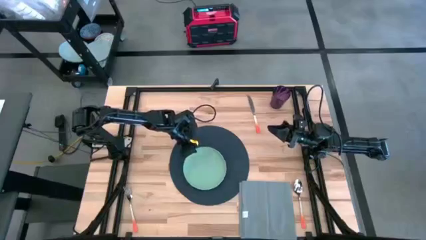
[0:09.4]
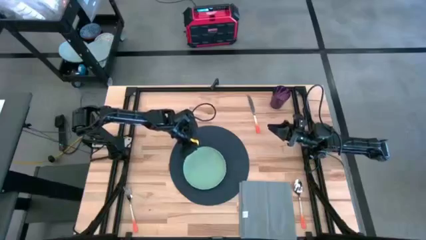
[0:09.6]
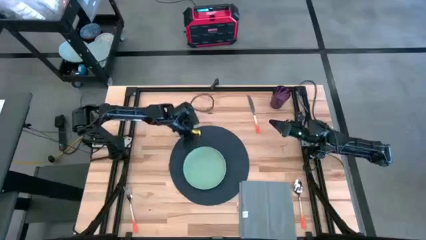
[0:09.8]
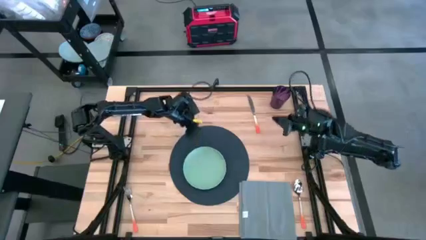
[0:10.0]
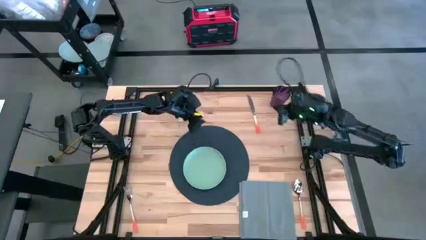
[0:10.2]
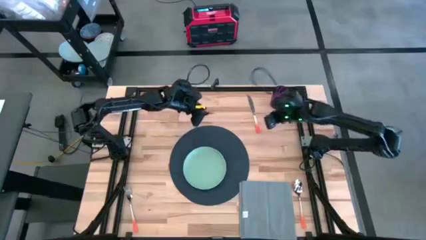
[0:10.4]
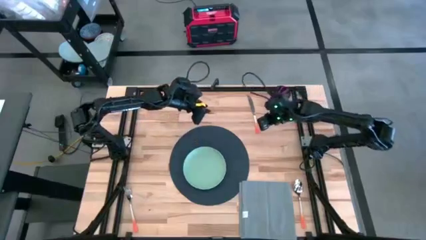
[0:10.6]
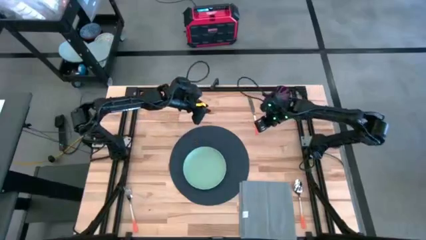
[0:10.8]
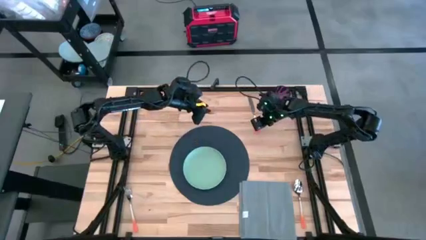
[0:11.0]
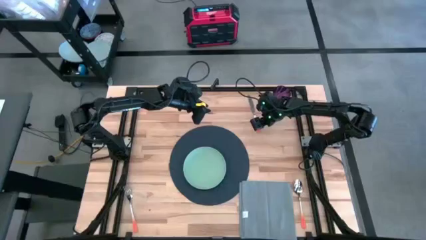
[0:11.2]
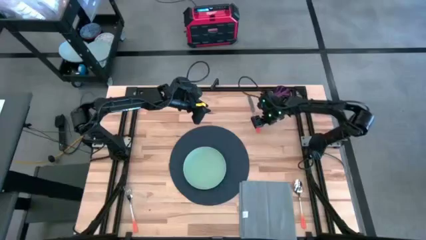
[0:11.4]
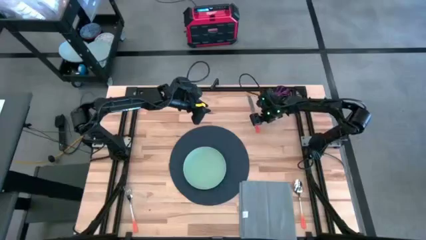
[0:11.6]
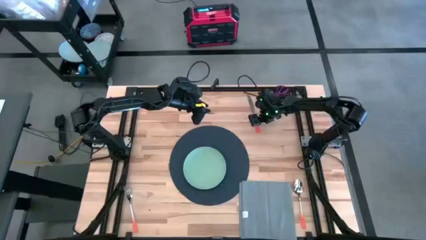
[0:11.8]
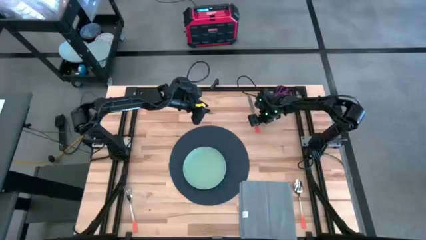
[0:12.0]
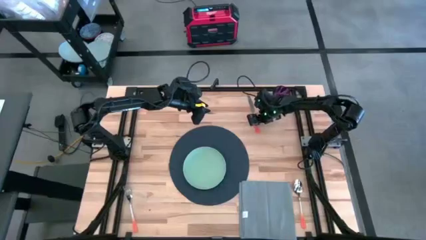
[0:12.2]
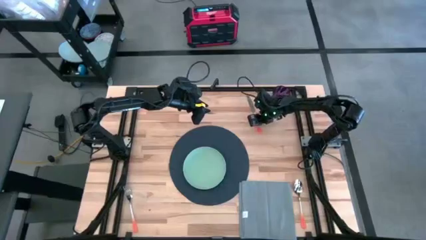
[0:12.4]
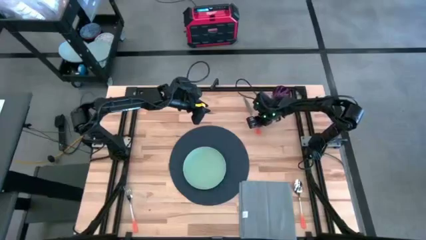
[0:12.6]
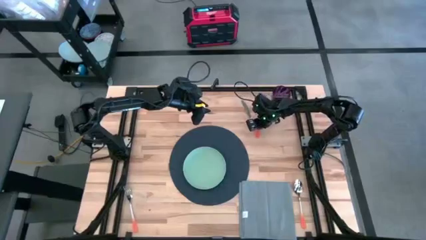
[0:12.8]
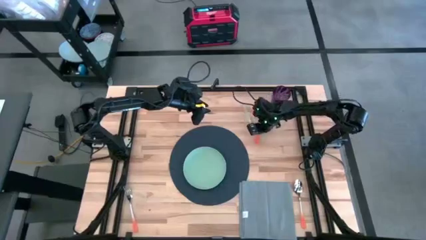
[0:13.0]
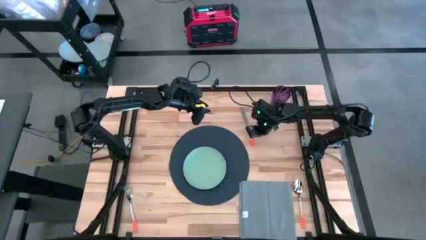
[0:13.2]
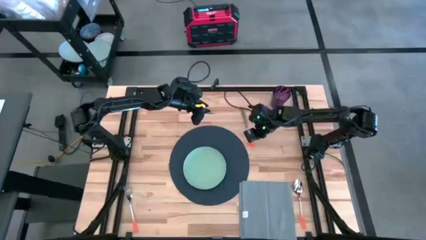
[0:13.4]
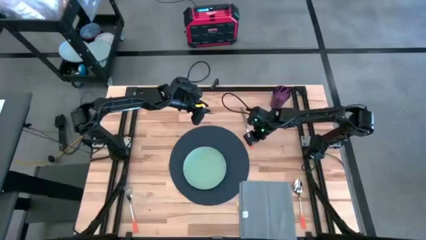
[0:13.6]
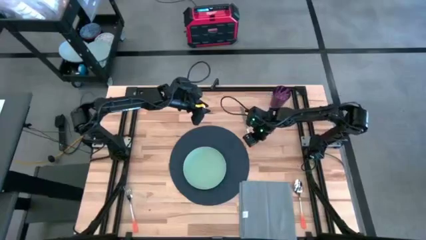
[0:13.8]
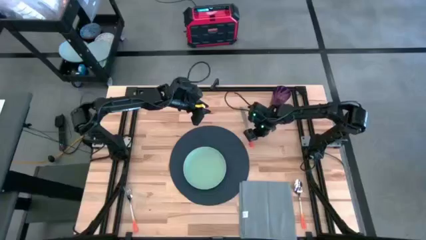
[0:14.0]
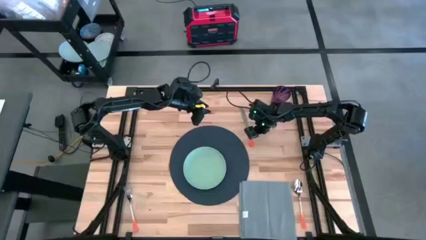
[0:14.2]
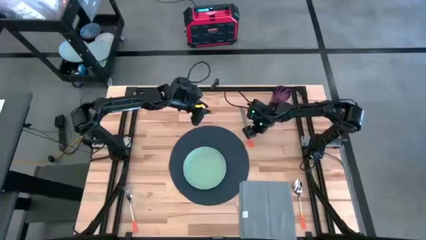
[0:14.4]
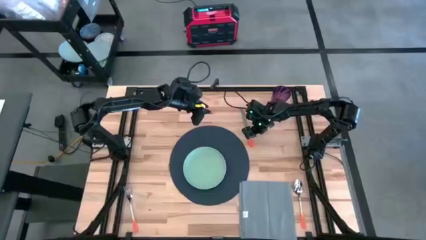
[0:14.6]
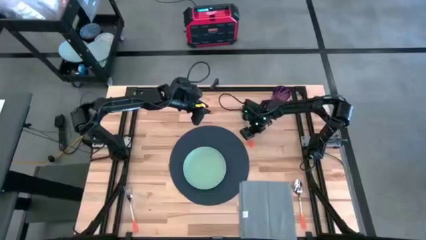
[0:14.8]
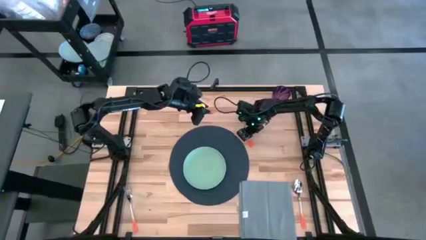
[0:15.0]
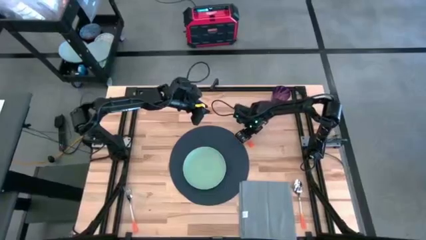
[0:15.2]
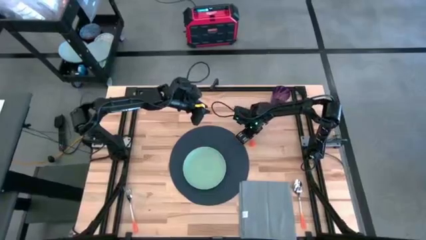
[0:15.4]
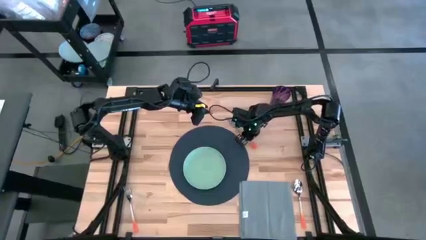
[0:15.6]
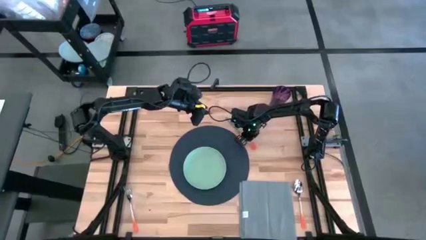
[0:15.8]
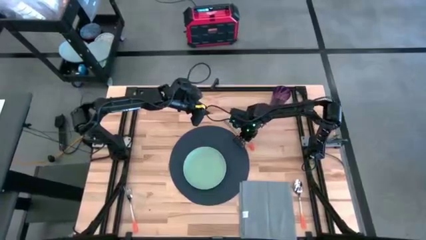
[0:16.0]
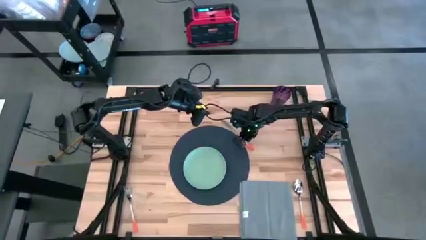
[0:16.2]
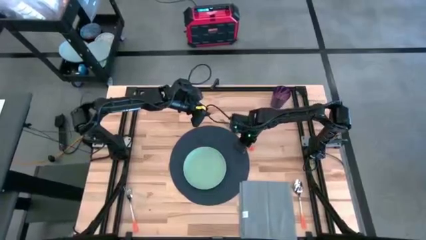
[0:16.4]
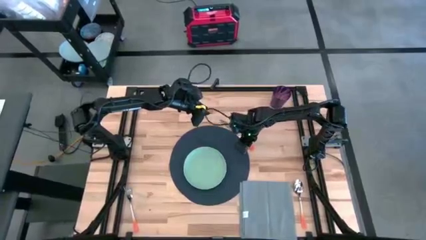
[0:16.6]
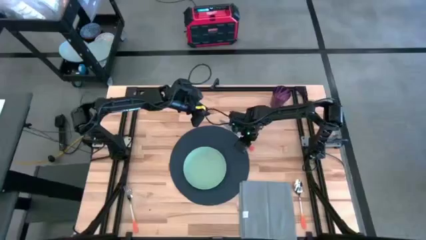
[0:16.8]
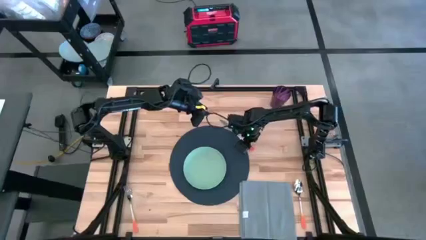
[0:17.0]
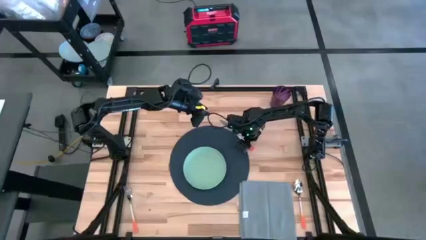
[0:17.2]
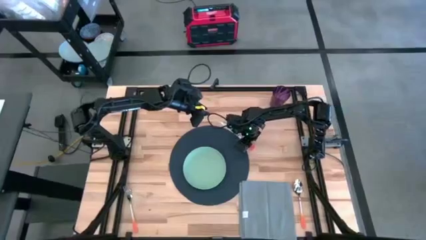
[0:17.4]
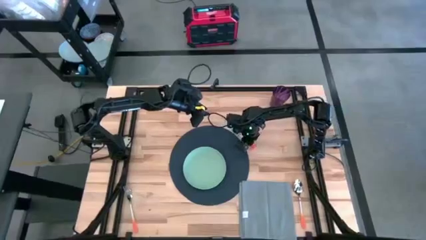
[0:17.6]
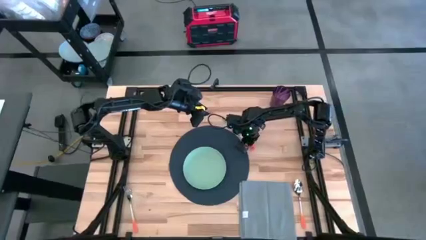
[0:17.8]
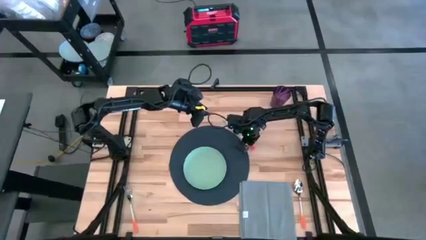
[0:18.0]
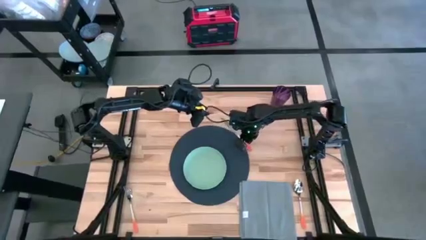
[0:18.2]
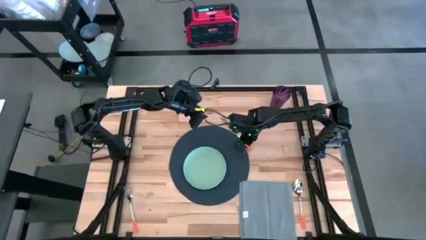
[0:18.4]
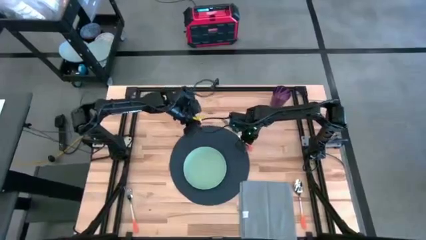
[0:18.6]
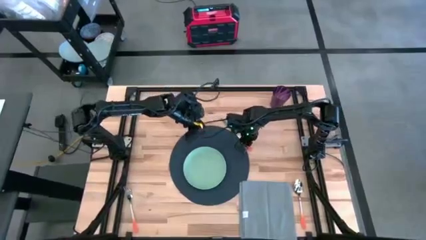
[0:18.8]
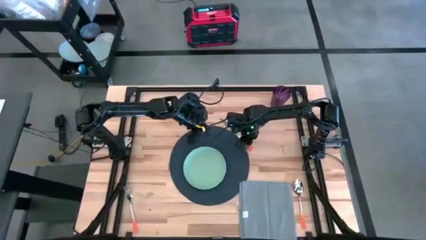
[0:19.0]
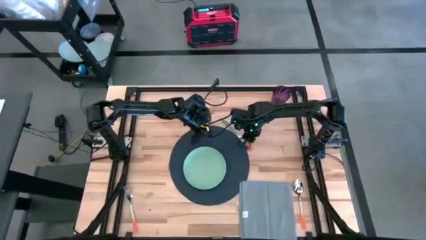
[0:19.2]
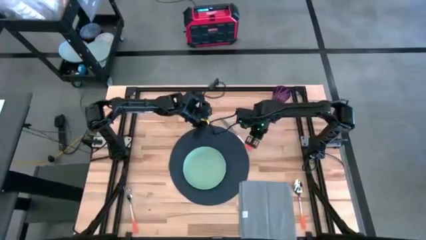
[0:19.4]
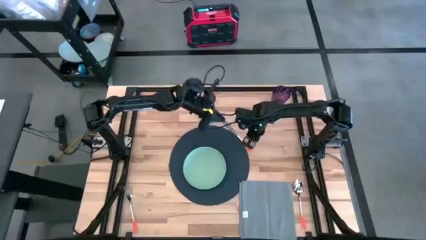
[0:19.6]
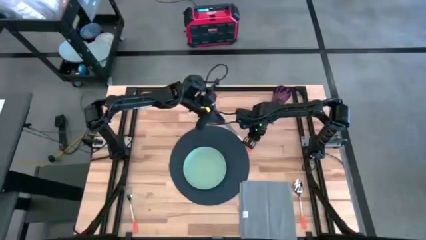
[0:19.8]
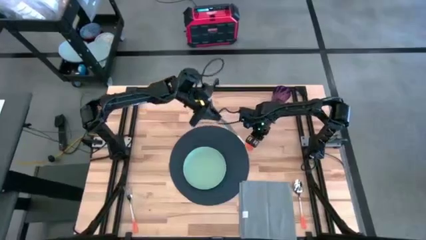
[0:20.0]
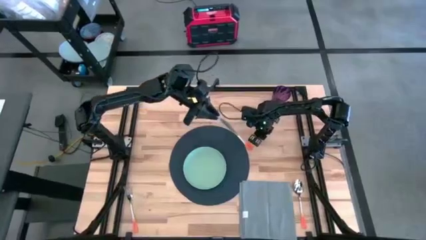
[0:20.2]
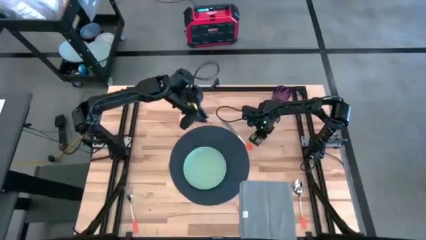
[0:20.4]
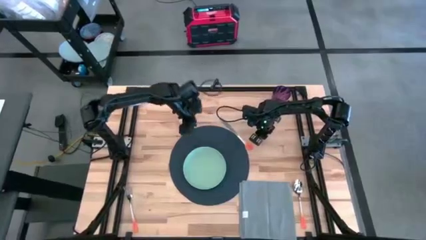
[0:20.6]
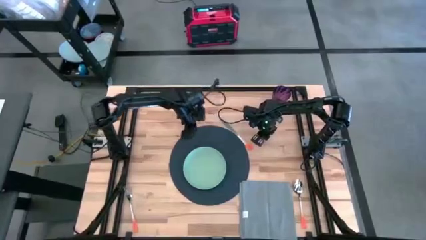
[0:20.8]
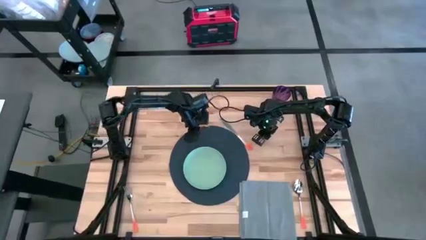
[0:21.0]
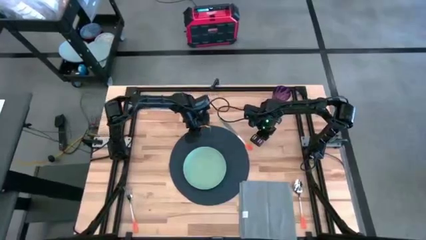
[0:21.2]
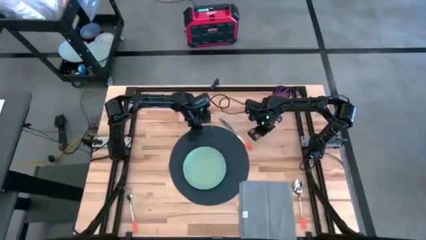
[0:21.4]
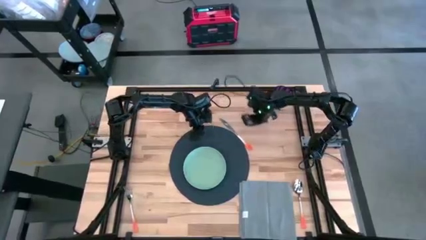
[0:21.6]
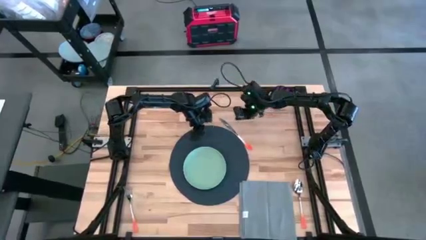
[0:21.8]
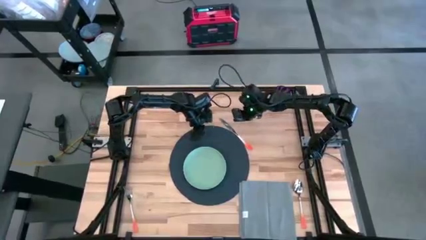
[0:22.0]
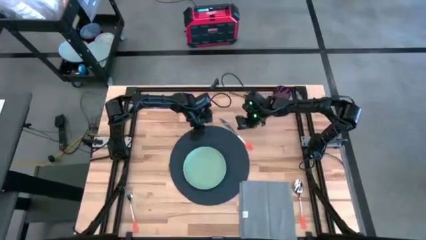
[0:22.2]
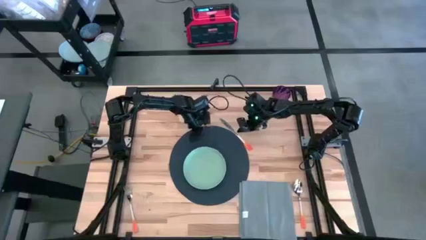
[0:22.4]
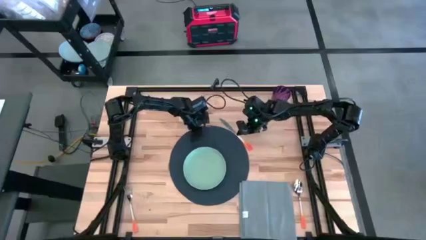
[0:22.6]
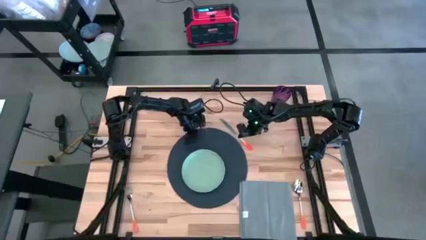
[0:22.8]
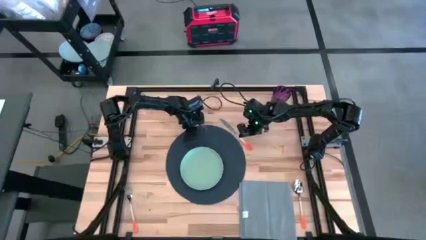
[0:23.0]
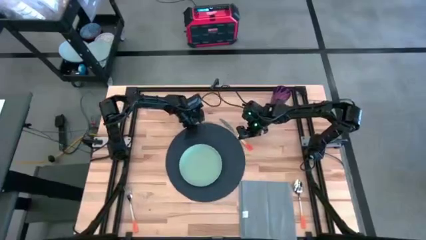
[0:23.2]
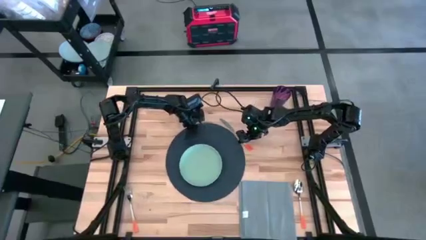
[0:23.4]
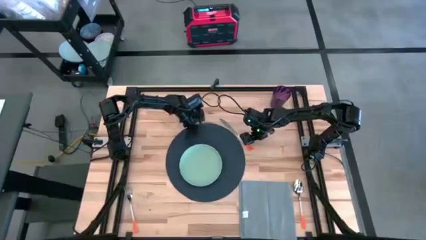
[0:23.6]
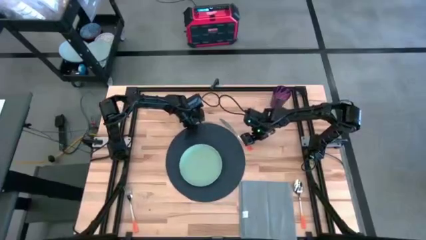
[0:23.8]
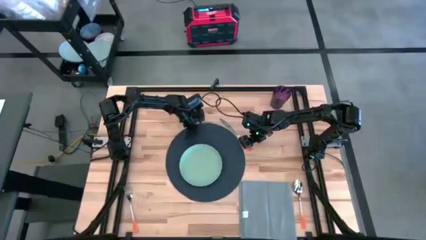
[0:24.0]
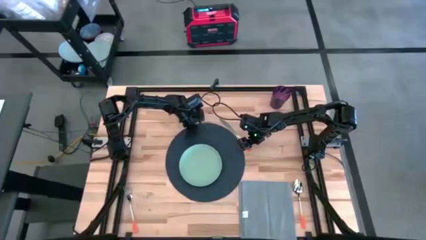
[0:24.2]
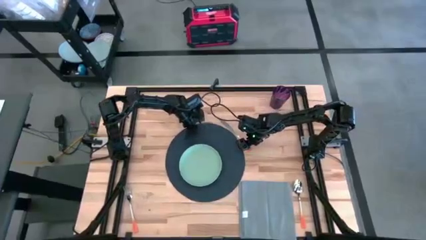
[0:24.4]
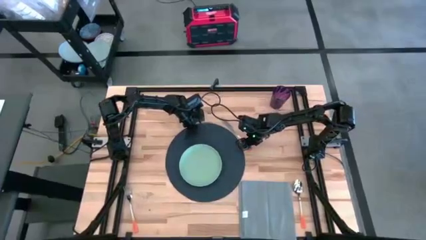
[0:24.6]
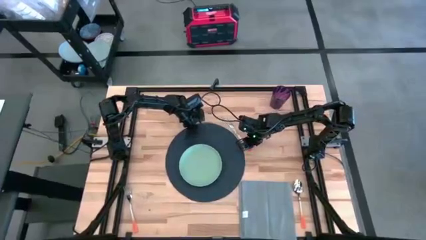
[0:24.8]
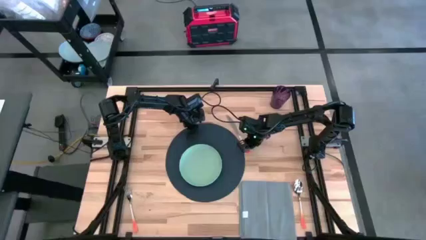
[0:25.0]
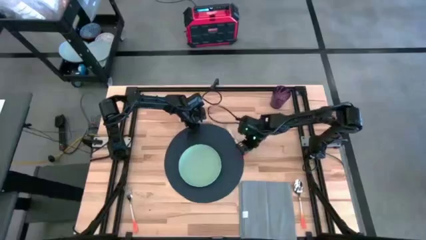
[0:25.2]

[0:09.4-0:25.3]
Task: Set table place
Put the orange knife on the blue placemat to the right of the green plate

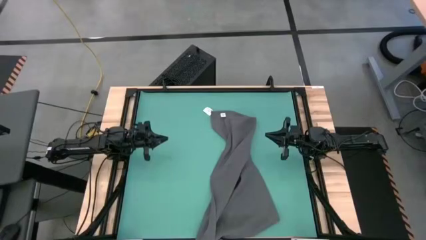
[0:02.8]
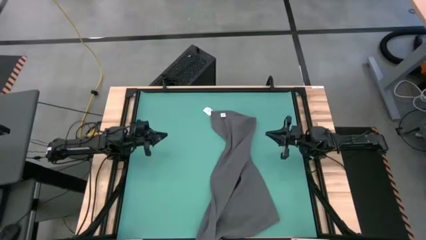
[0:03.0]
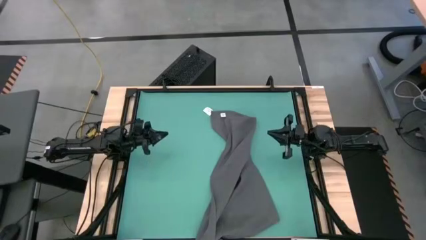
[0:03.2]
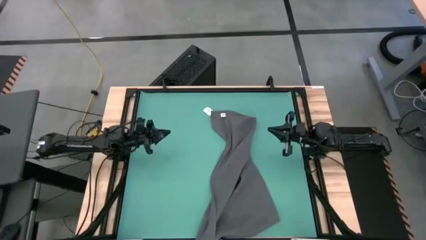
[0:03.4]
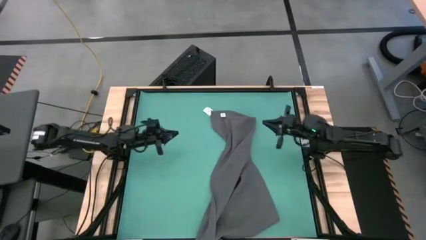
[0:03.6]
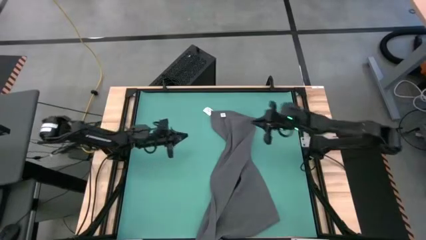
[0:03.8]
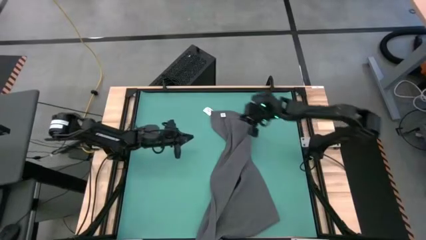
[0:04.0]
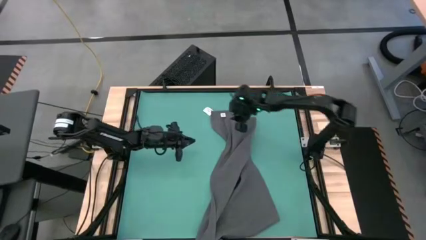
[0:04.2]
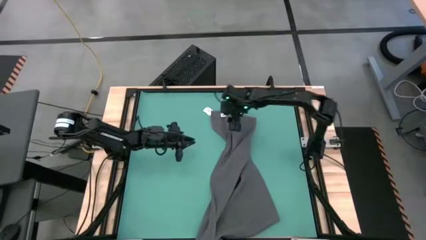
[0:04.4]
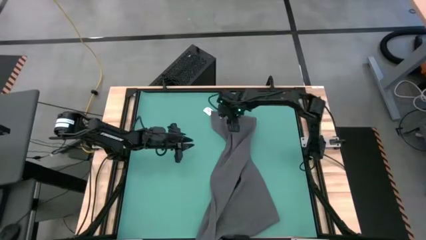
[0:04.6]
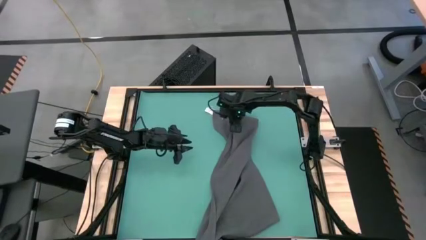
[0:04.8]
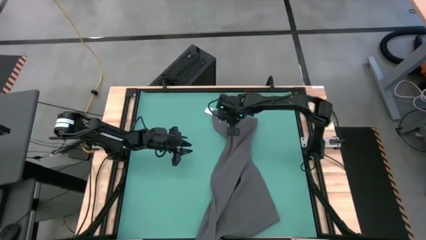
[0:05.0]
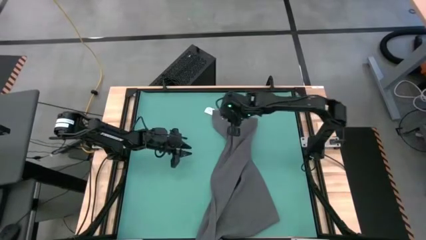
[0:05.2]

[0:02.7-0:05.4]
Task: Roll towel into tight, uniform cylinder
Fold the gray towel
